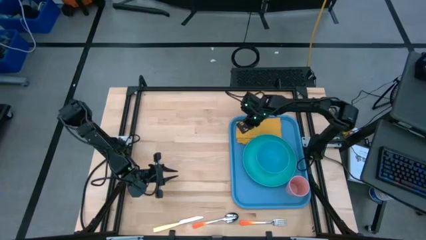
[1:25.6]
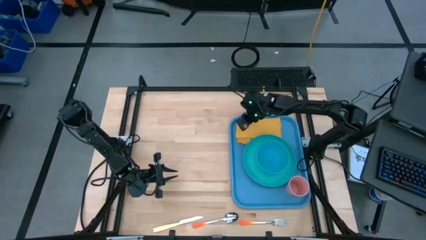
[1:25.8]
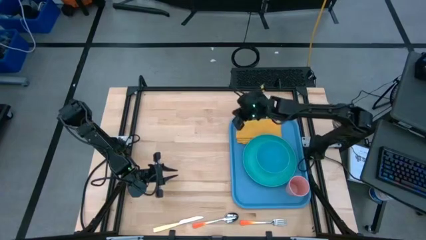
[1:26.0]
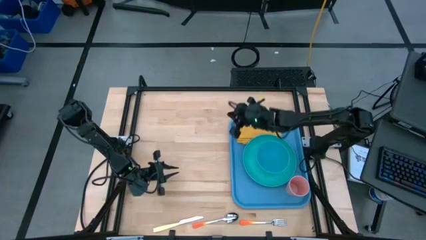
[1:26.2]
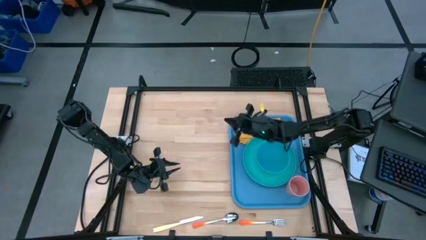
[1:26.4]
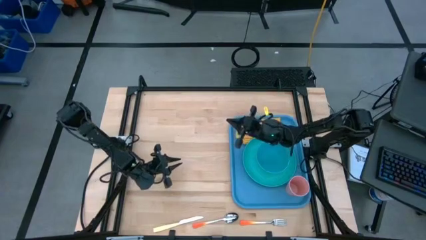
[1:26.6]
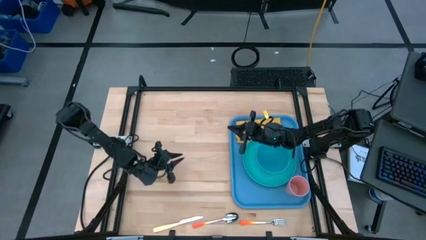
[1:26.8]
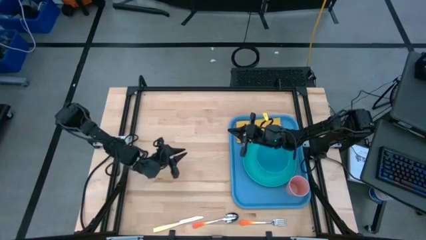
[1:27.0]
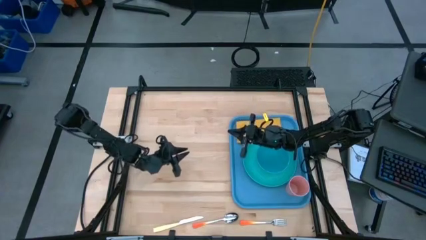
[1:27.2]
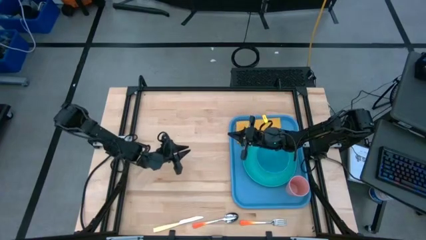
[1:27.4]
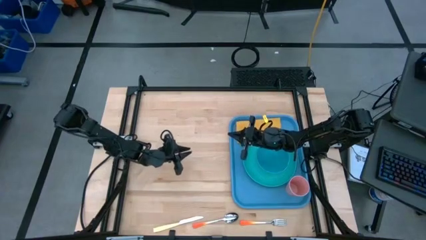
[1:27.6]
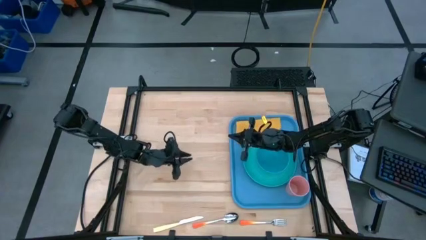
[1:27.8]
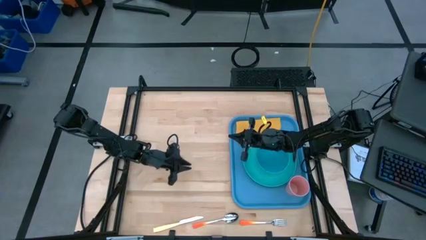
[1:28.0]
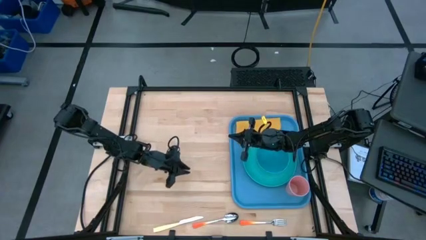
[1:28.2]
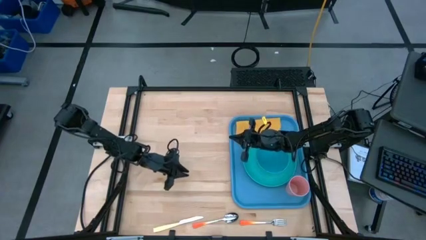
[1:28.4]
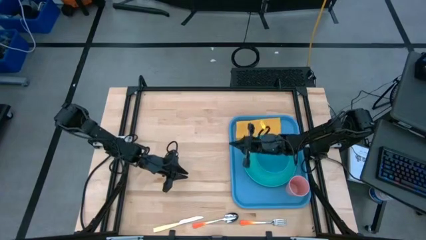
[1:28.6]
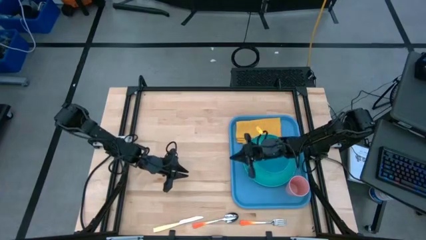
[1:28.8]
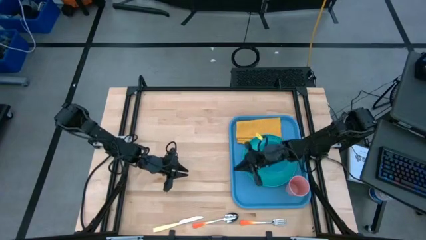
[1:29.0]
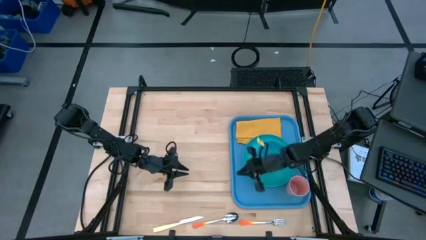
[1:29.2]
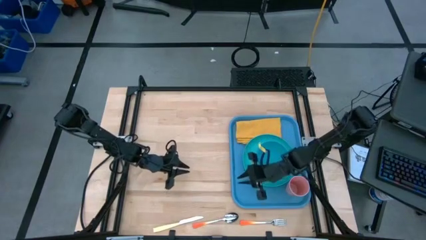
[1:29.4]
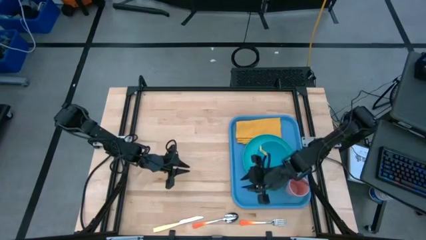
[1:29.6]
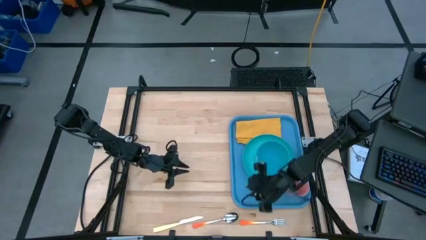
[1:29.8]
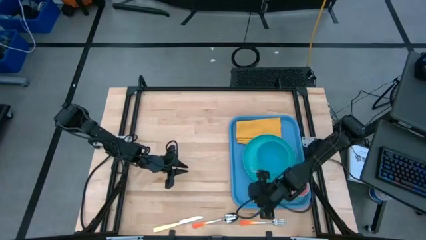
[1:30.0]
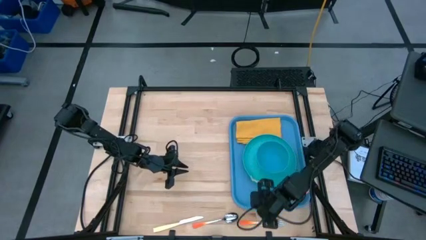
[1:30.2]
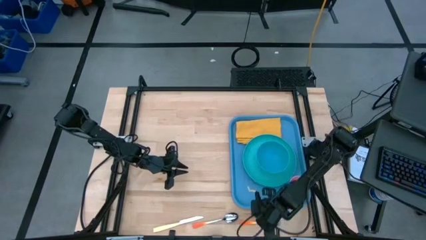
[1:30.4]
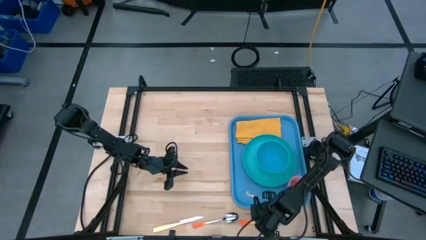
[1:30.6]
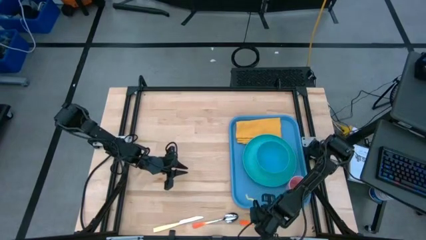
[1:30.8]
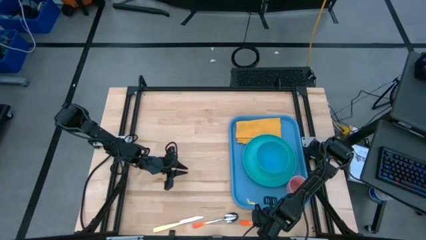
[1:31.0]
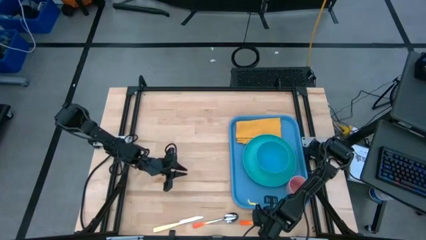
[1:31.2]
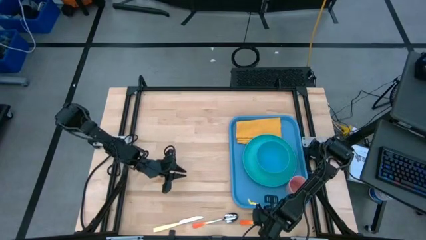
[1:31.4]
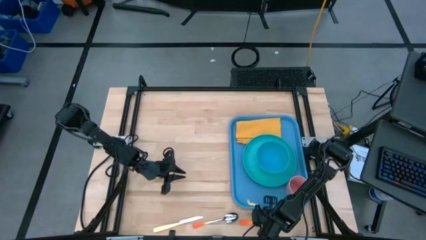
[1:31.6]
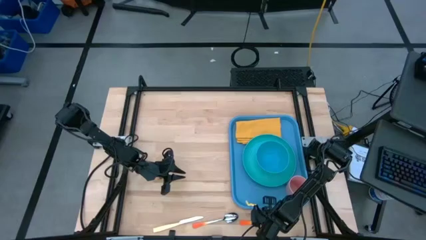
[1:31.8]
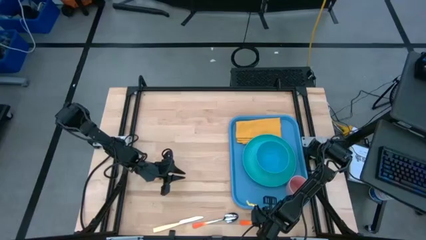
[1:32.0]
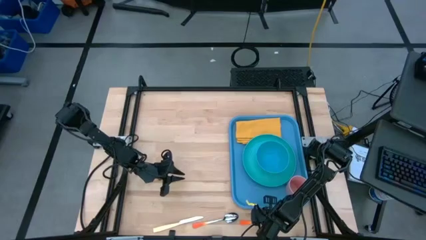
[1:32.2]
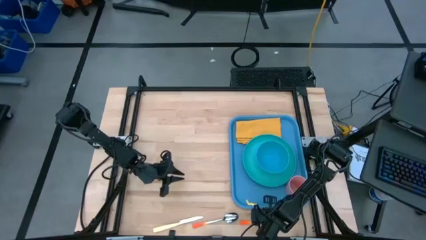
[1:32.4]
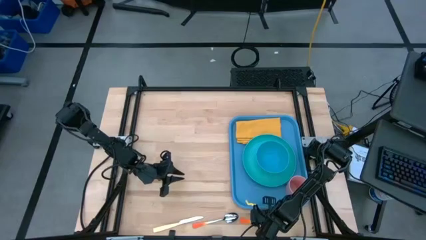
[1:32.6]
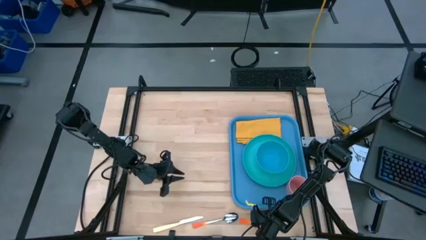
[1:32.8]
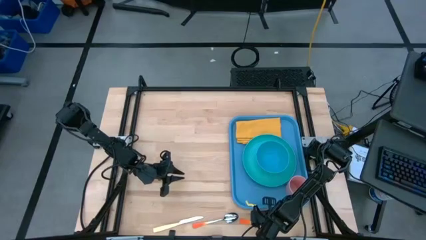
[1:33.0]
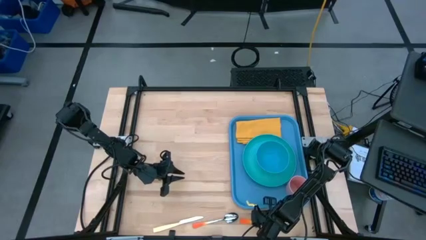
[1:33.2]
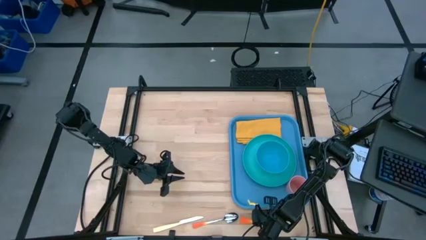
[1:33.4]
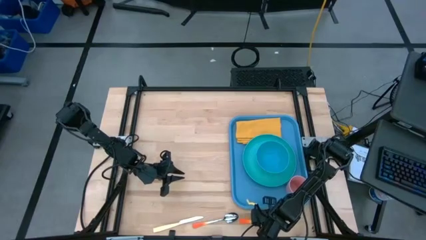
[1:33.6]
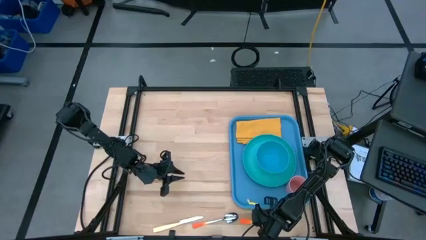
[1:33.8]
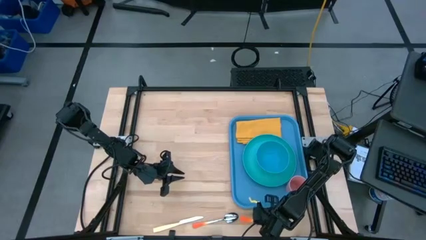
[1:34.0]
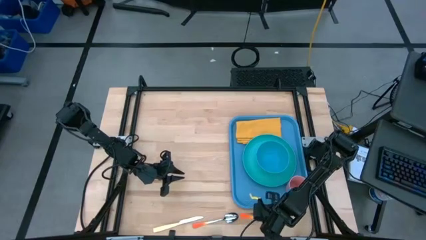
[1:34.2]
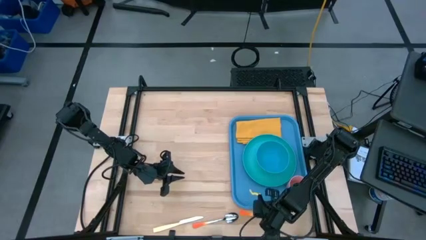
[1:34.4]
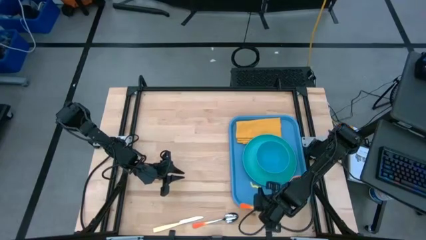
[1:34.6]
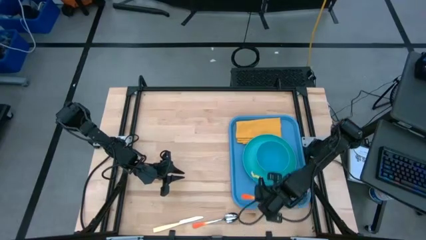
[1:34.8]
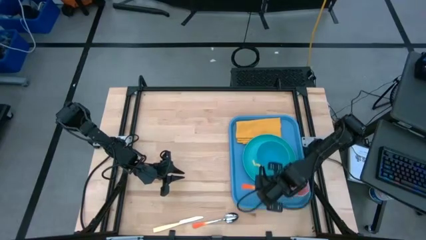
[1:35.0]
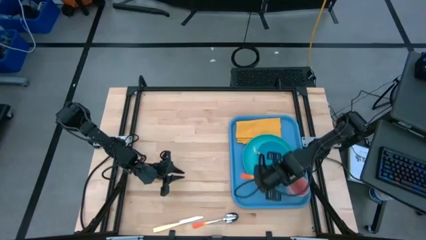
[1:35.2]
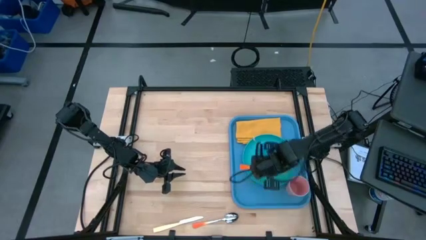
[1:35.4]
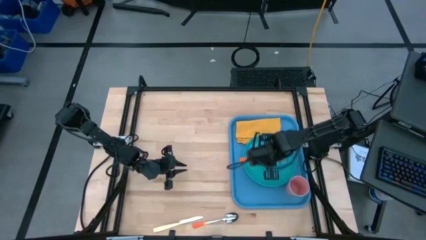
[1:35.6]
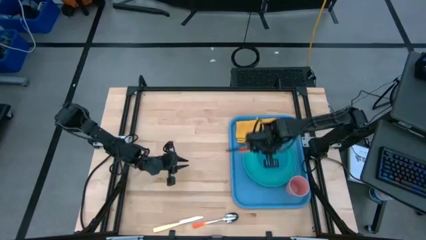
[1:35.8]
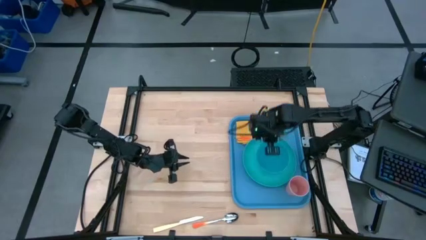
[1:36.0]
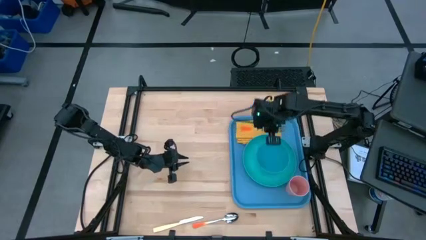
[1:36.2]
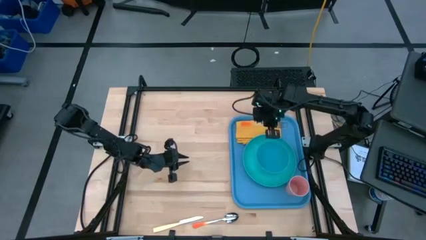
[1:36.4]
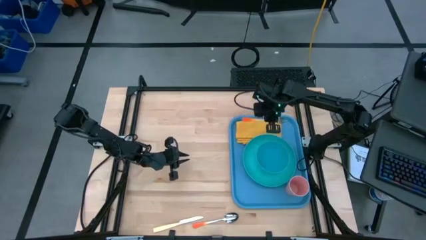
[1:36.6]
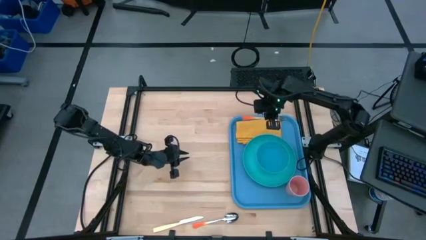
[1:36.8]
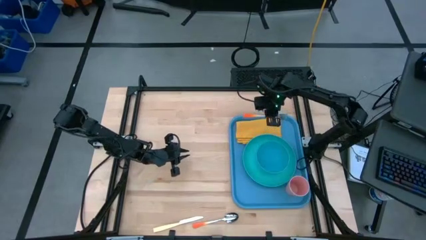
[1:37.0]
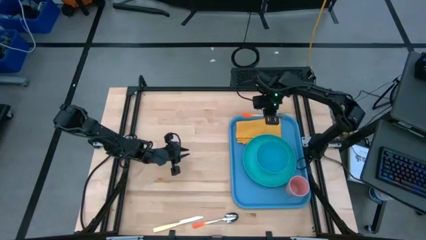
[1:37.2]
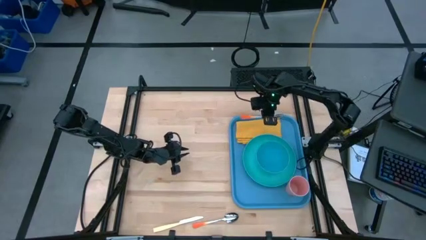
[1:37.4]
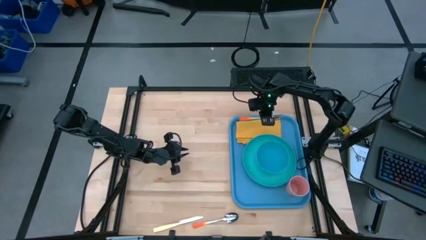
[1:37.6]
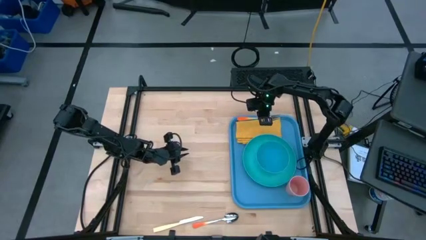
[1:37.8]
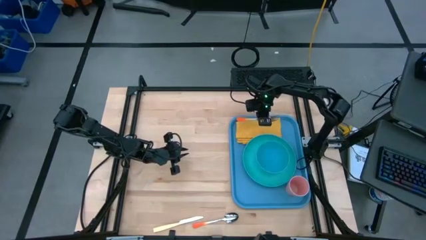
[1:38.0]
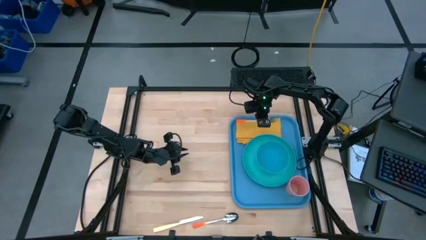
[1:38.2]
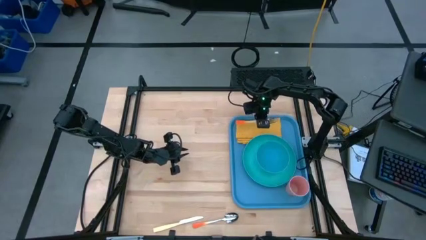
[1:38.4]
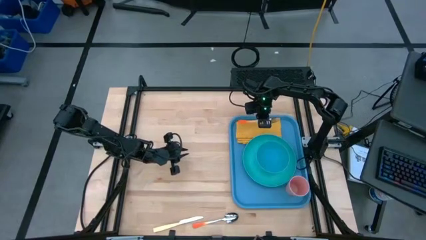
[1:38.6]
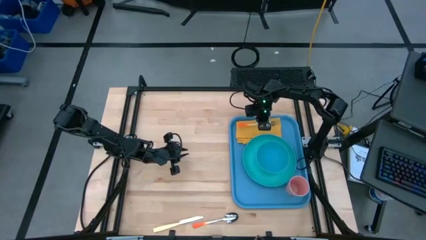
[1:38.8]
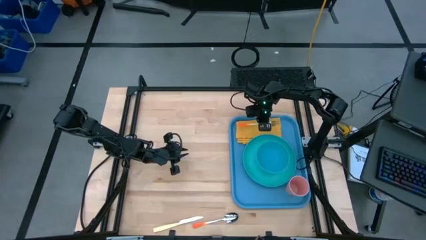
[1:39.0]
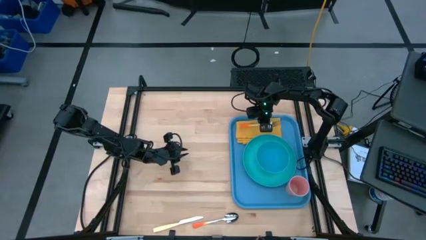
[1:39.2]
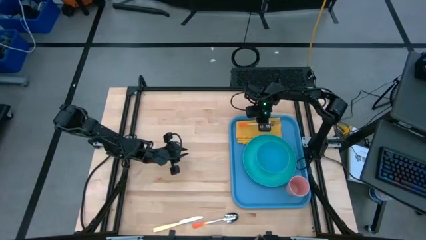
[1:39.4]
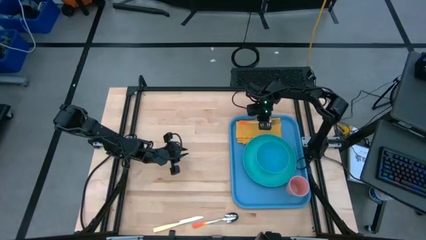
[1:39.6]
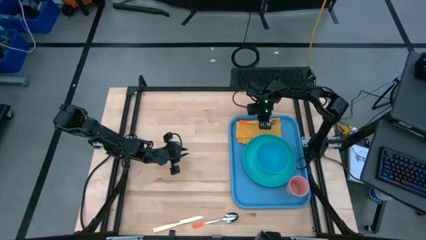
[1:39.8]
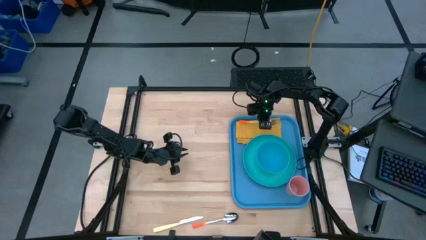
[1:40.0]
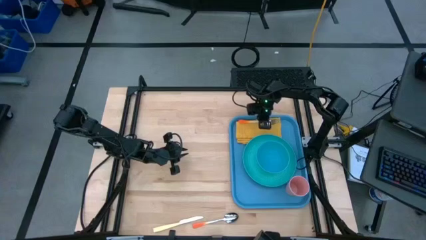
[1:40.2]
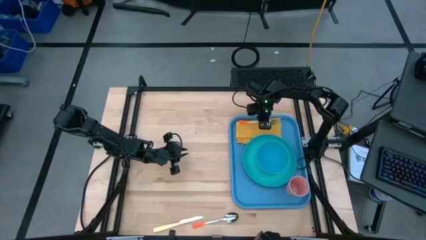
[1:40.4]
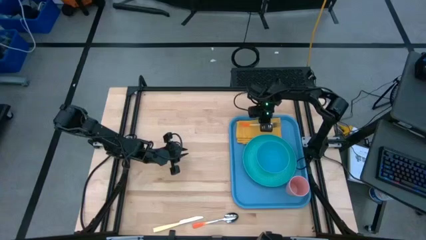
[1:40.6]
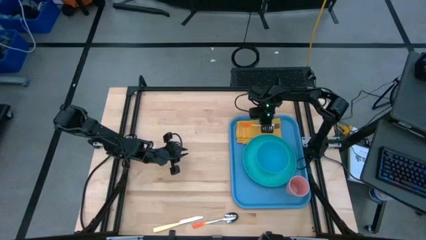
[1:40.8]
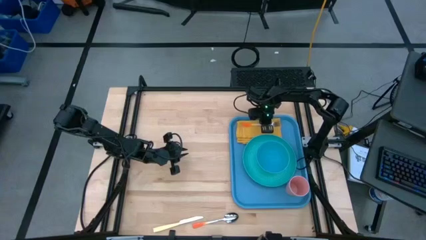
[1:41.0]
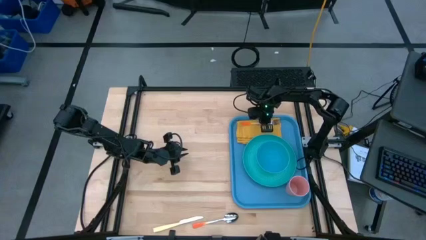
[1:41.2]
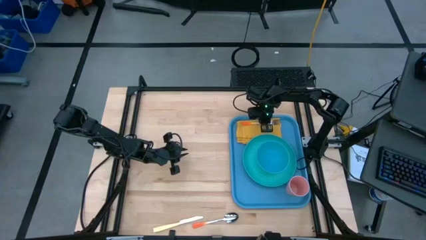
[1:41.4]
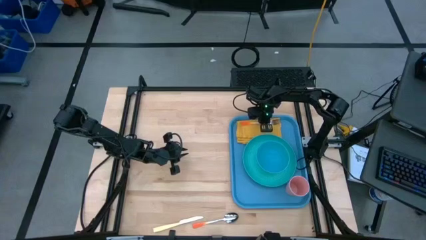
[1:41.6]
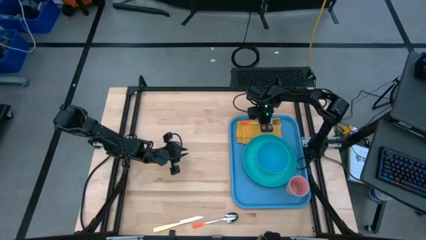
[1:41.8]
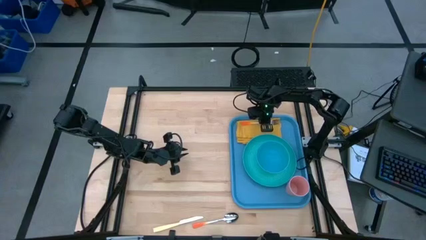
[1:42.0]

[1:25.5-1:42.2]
Task: Set up tray
Put the orange fork on the napkin to the left of the blue plate
